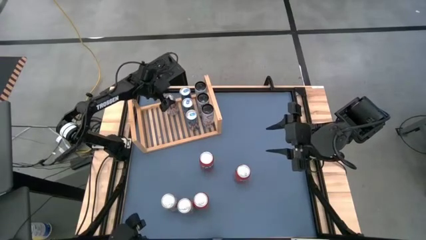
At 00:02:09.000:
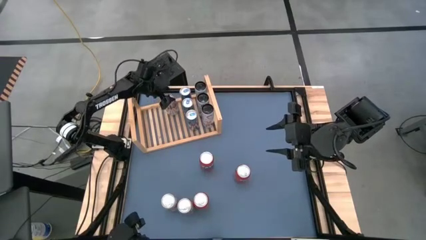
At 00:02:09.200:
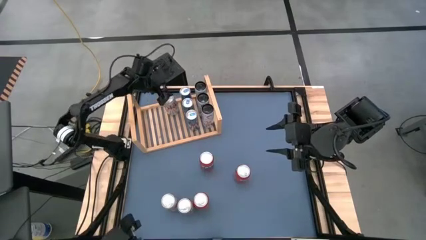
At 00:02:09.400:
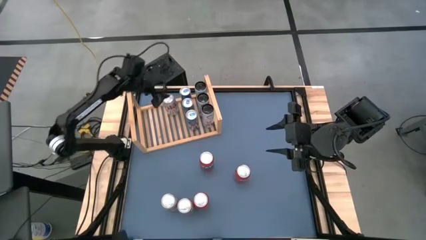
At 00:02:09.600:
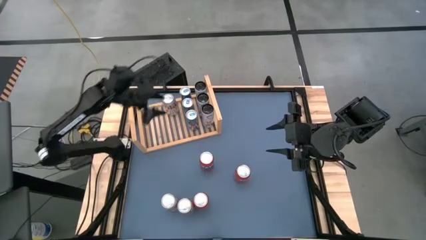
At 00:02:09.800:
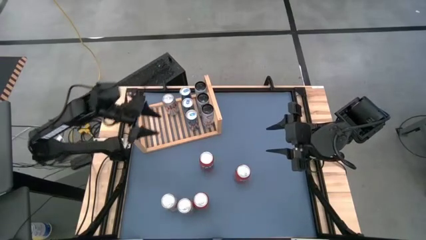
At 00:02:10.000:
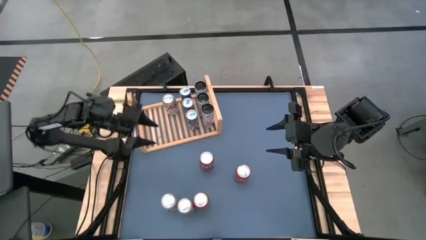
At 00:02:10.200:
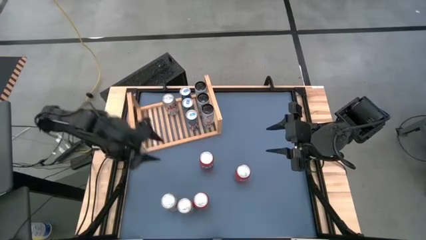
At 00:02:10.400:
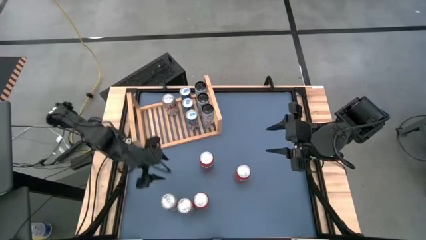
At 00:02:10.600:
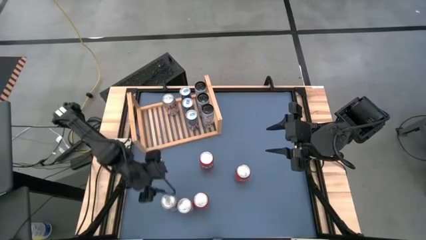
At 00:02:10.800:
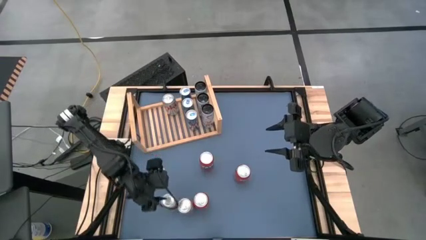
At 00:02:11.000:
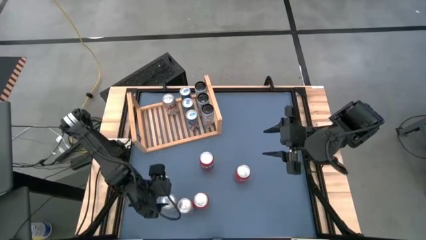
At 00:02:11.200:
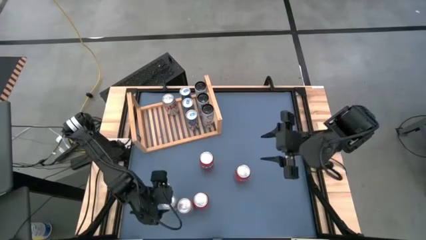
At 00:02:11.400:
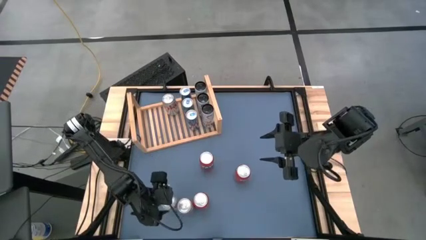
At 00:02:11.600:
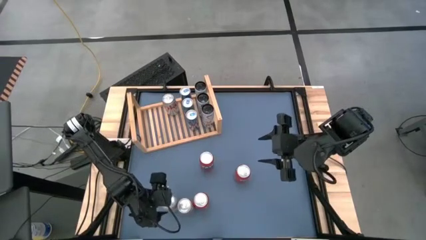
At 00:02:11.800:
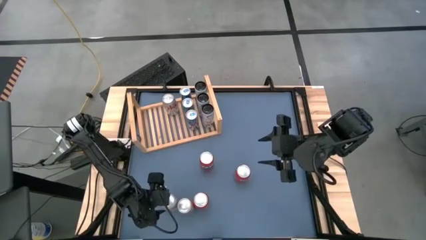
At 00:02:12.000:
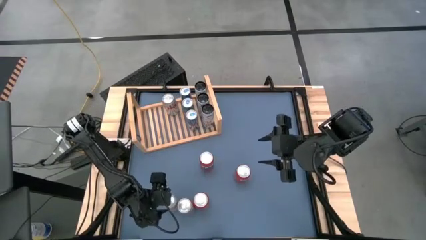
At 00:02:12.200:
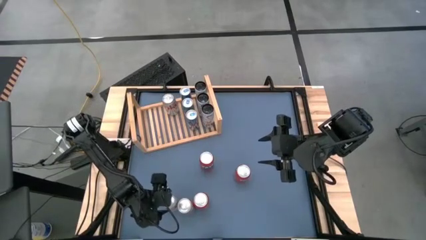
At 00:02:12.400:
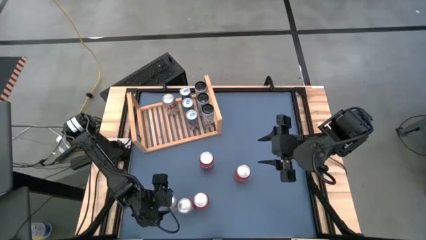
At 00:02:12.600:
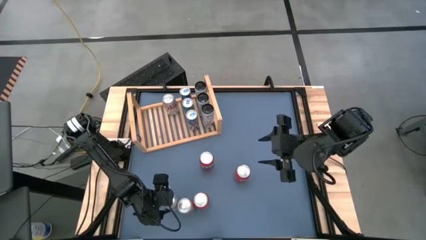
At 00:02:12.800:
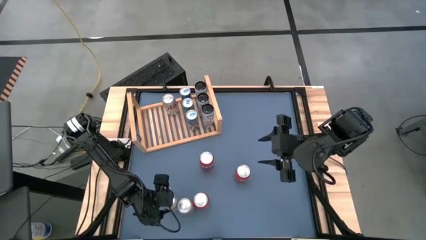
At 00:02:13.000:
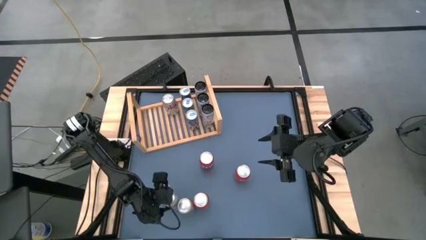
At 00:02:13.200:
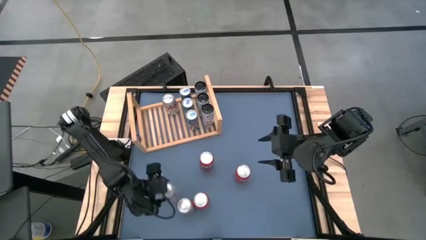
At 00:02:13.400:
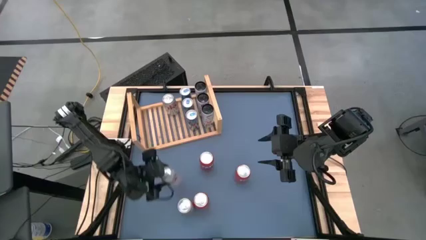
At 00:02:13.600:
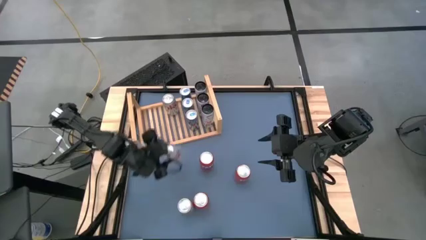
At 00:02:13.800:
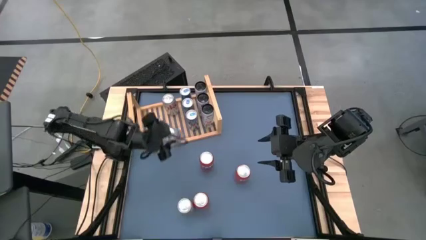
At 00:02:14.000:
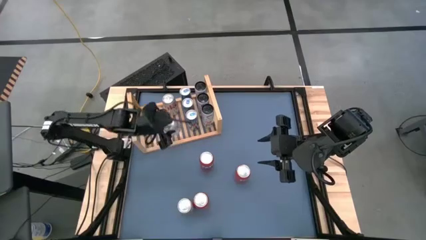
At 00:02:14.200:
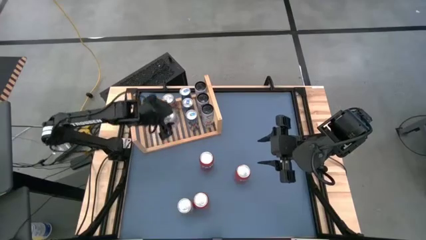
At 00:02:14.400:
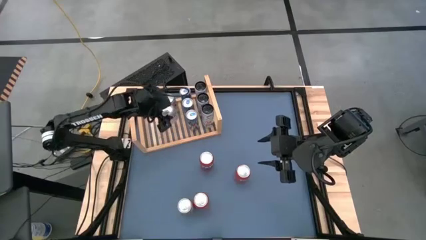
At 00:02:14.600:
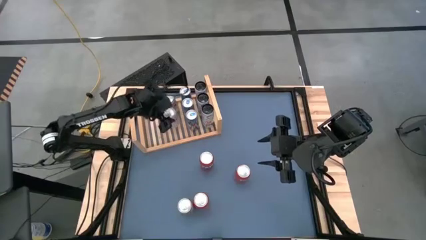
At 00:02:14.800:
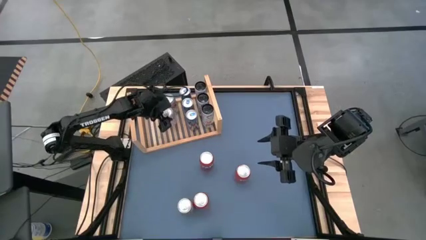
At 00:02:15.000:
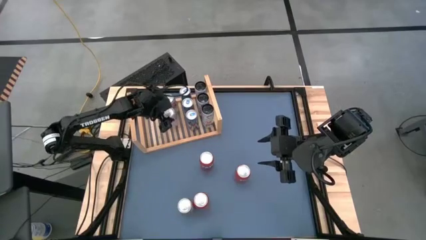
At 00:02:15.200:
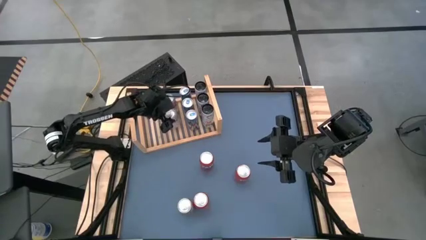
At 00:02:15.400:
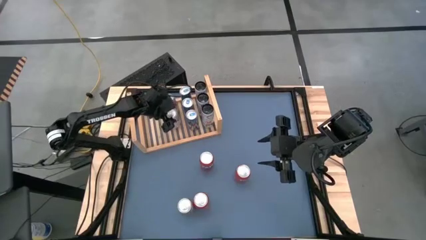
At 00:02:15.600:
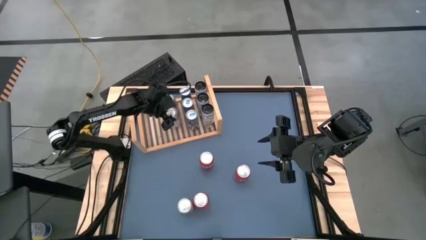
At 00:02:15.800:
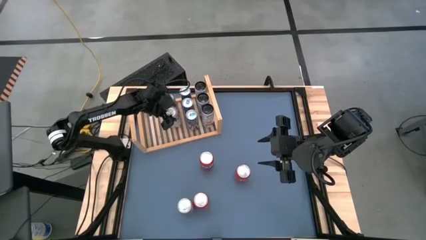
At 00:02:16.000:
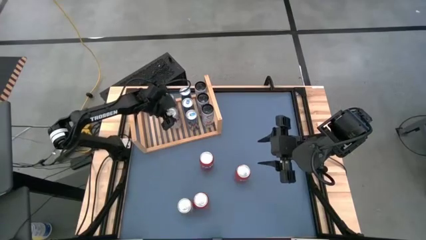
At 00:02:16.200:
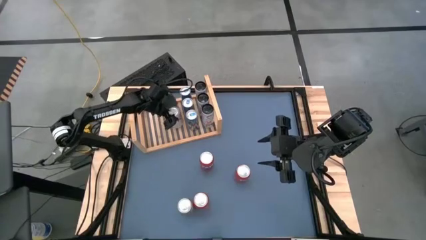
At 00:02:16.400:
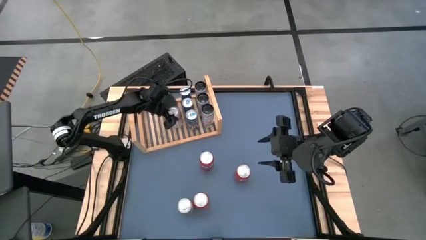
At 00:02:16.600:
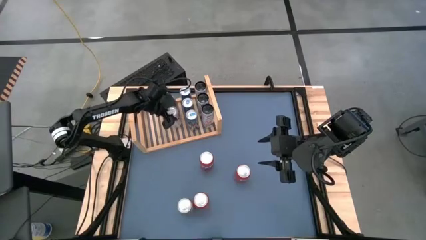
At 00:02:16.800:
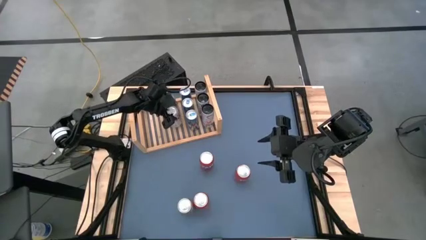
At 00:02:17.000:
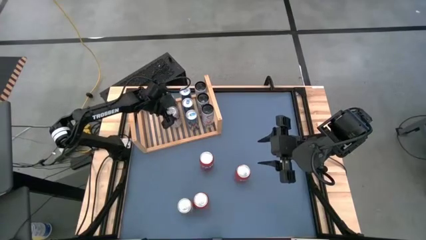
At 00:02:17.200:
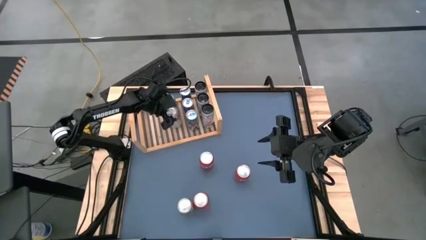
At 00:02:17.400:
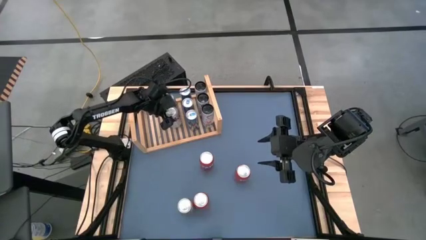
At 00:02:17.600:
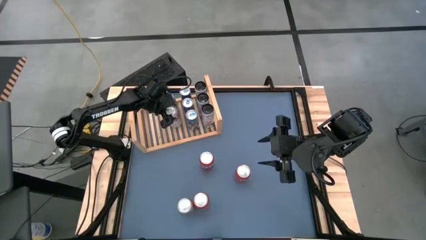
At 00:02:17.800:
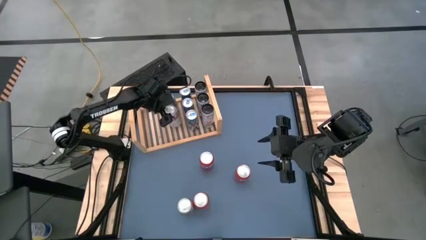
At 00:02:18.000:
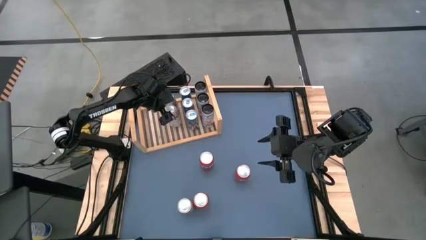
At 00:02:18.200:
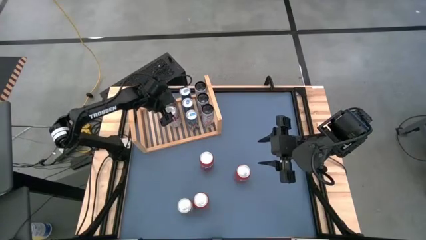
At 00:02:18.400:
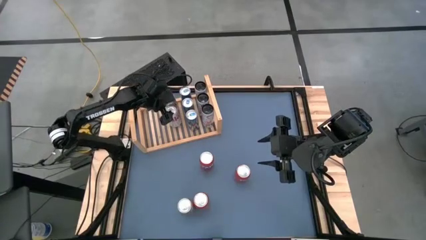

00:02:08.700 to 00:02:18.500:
Task: Place canned beverage on shelf
Put the left silver soda can on the shelf aligned with the other silver soda can

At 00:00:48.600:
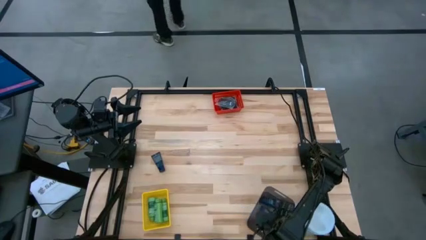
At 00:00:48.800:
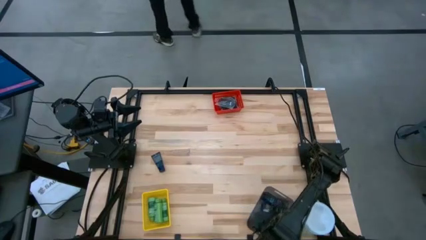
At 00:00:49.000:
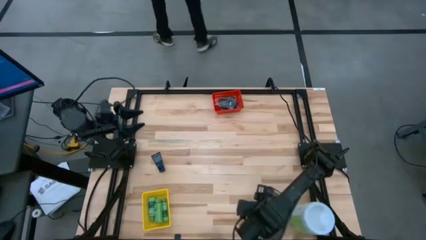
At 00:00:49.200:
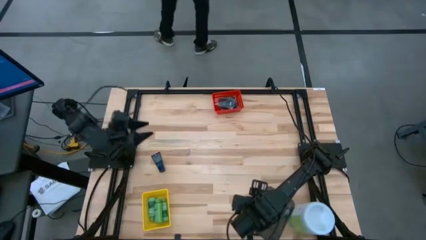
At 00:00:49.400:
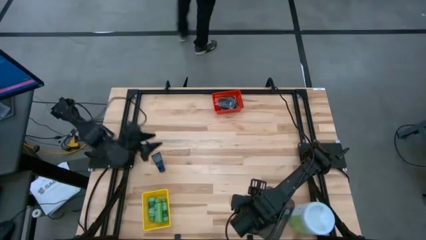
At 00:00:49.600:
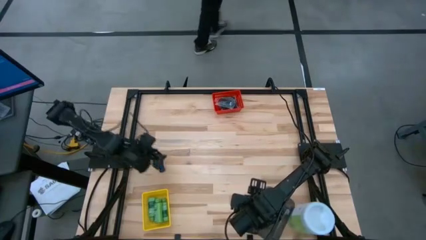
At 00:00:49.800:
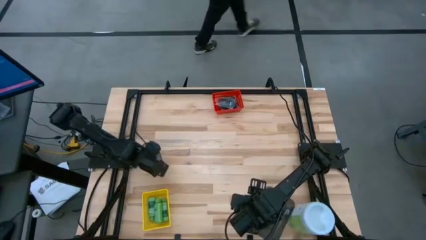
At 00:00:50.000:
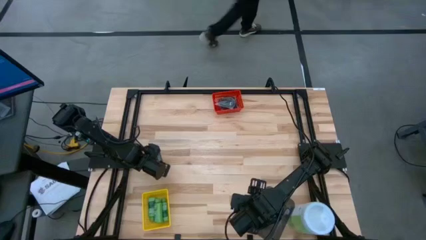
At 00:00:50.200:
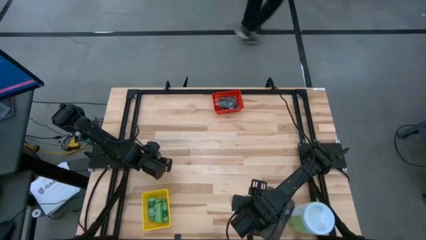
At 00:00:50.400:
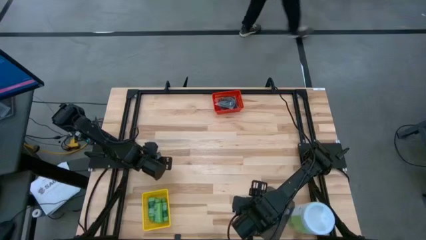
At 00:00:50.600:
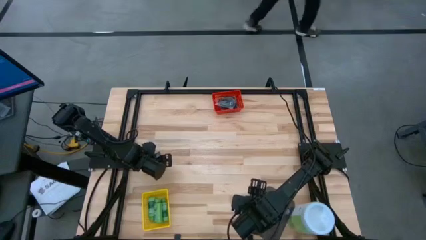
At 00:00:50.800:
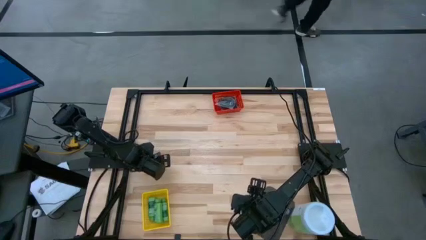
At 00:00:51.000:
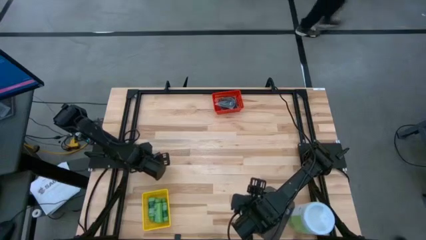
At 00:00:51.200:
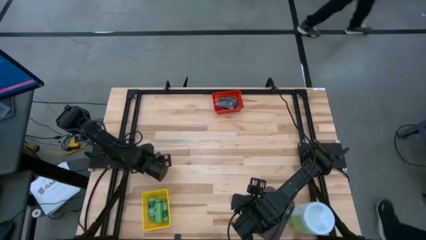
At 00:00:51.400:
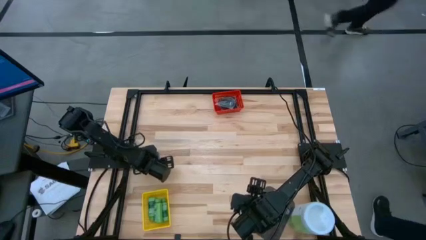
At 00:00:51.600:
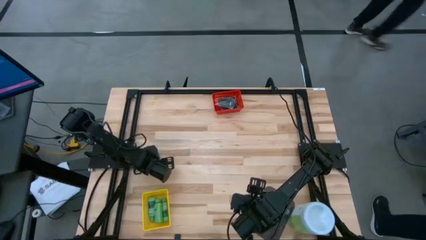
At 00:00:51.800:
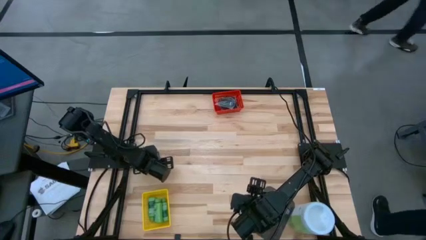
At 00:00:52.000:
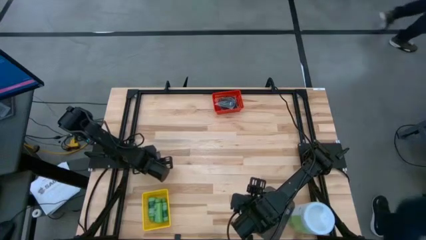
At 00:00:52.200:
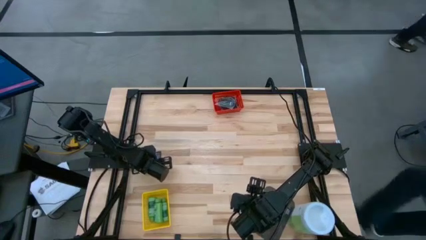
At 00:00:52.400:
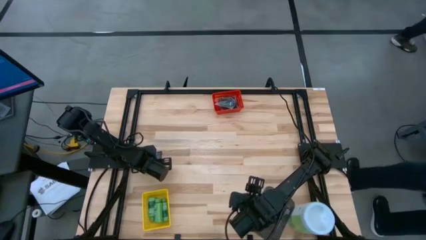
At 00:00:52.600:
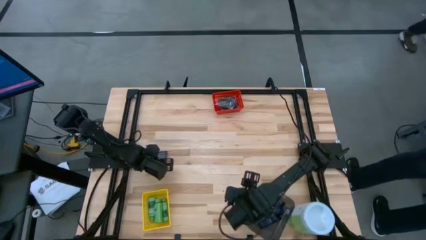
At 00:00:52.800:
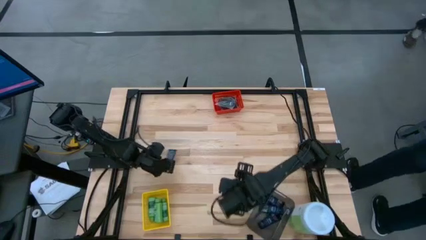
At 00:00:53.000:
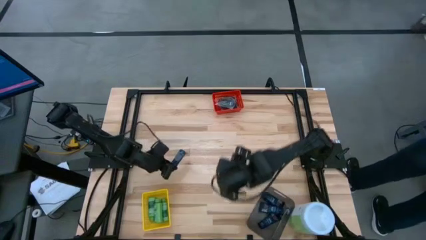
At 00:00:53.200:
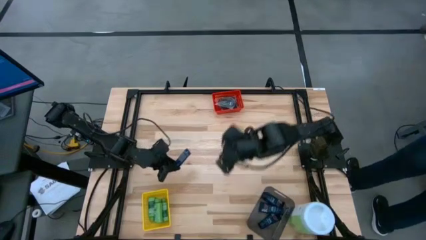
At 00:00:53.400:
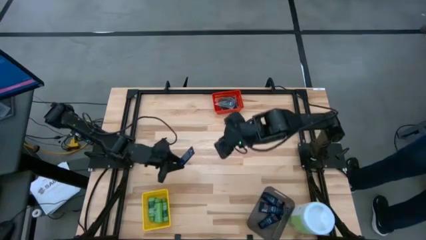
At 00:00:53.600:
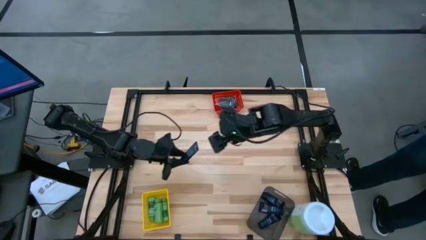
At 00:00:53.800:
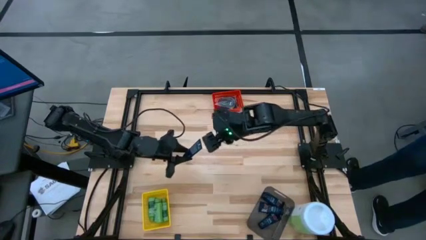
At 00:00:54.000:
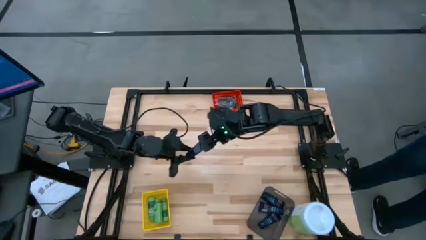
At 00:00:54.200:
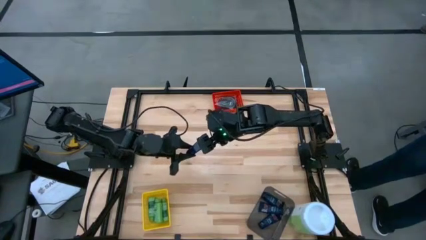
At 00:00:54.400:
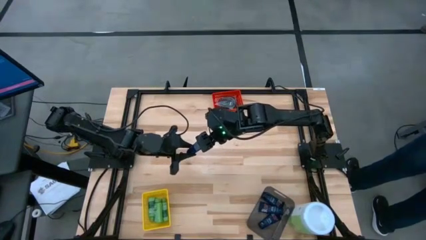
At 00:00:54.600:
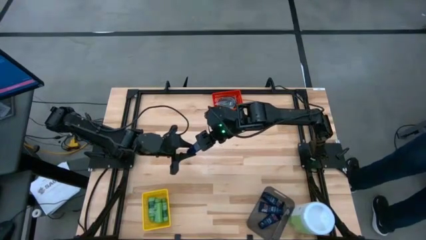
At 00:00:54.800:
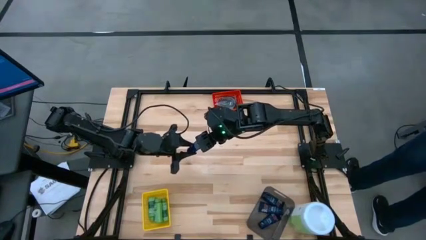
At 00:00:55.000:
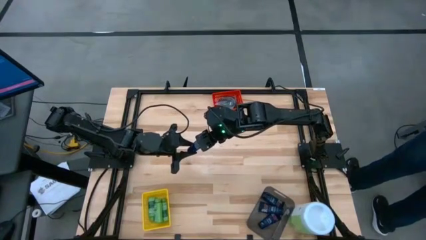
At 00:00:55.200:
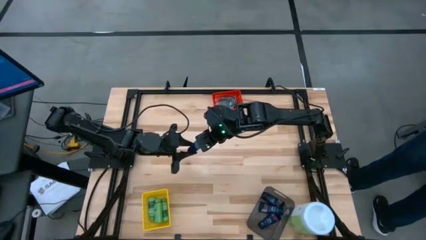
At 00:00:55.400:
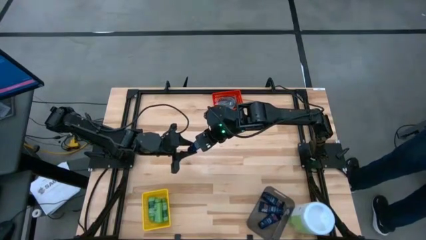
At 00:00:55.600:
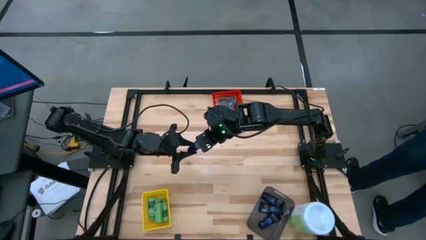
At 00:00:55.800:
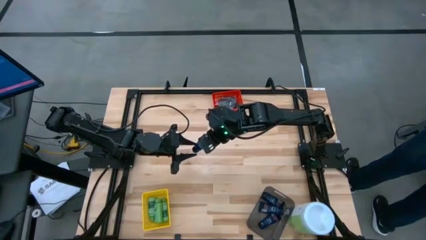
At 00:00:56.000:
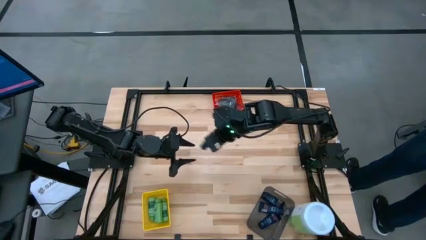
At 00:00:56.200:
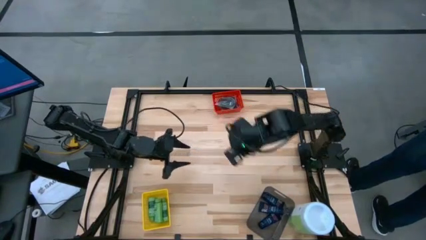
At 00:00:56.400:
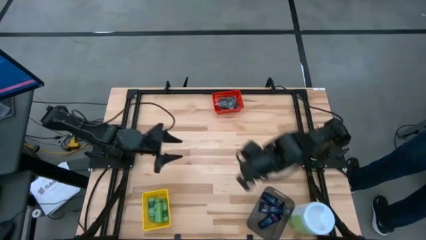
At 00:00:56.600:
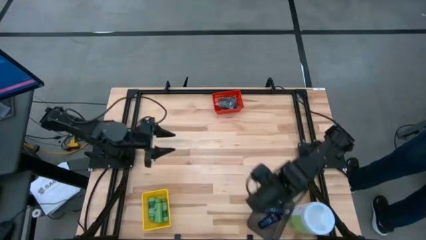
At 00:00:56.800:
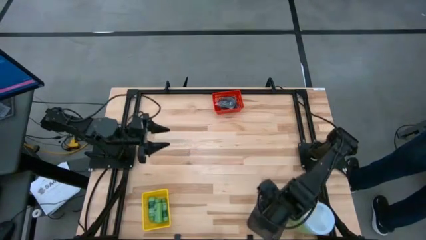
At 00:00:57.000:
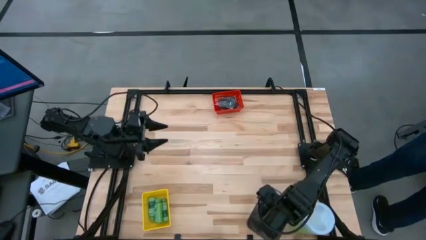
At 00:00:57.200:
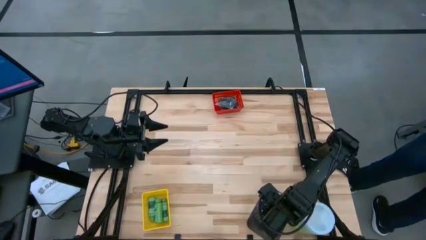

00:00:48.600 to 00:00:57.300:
Task: Pick & Place Travel size toiletries
Put the blue shave cream into the black bin
